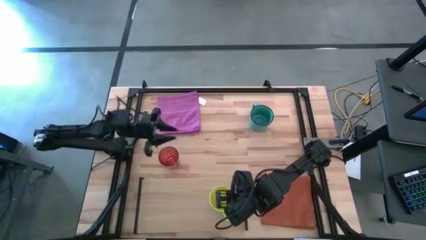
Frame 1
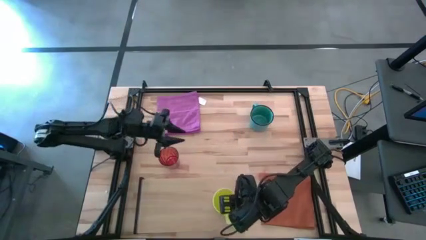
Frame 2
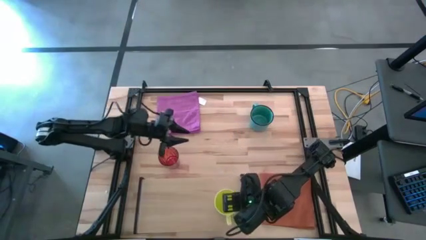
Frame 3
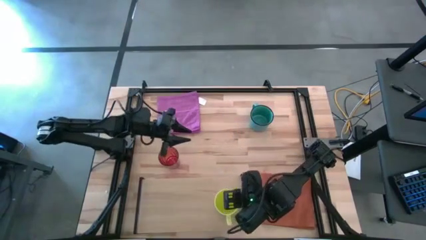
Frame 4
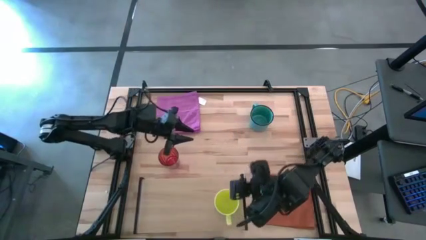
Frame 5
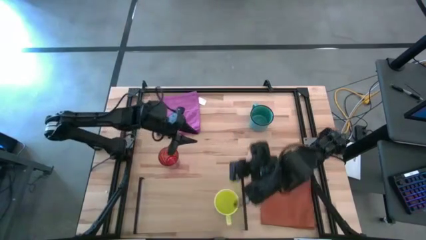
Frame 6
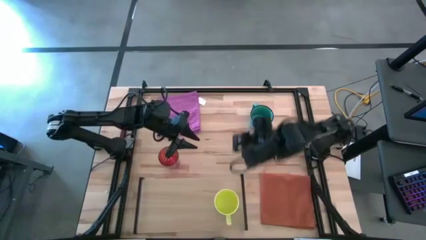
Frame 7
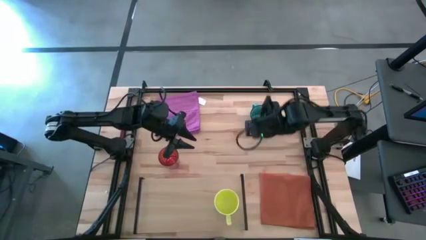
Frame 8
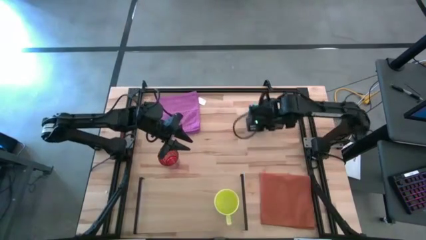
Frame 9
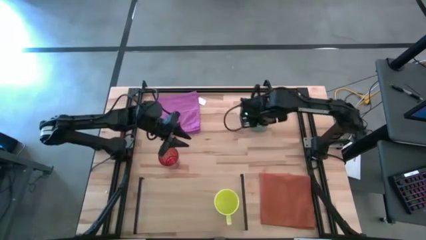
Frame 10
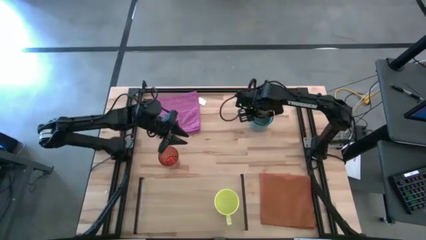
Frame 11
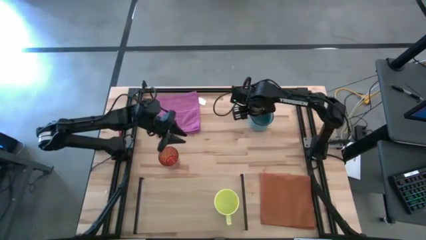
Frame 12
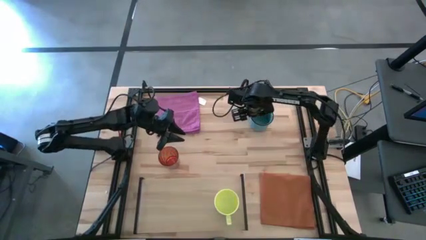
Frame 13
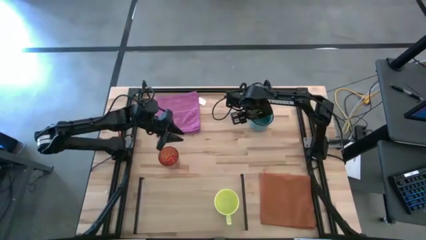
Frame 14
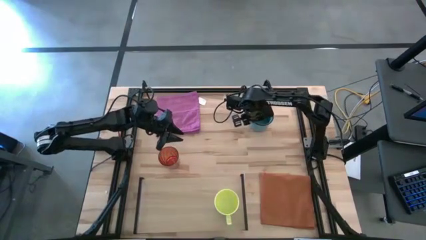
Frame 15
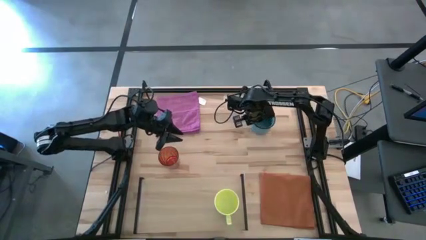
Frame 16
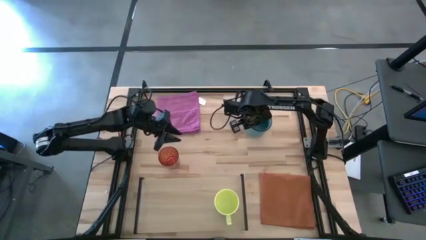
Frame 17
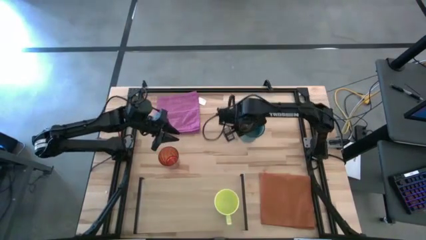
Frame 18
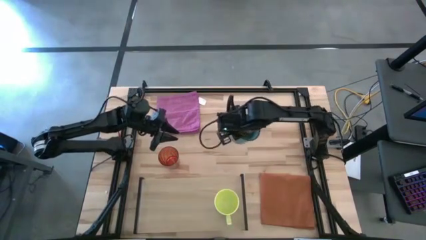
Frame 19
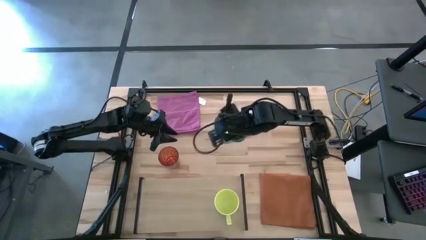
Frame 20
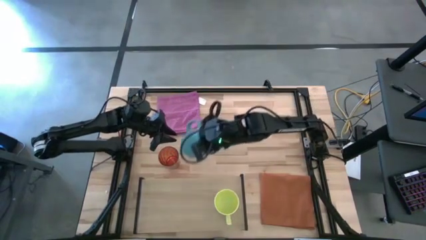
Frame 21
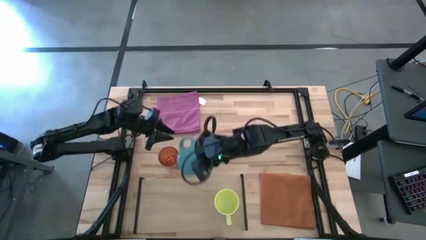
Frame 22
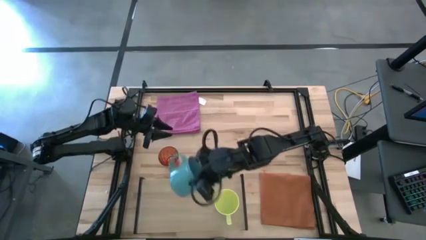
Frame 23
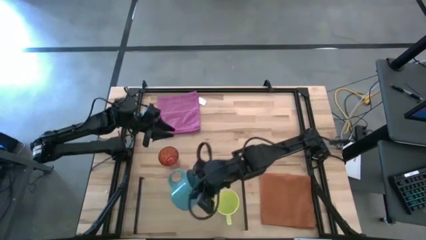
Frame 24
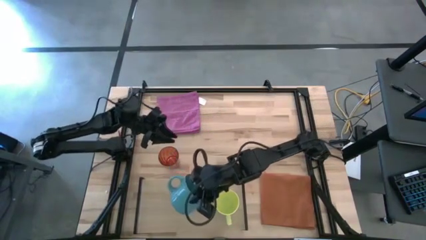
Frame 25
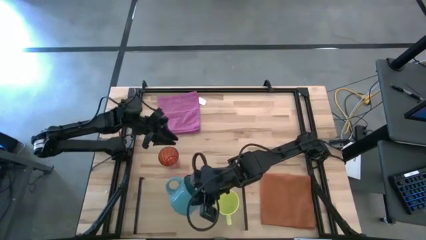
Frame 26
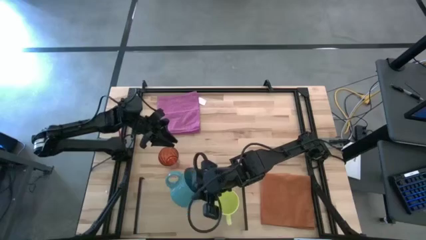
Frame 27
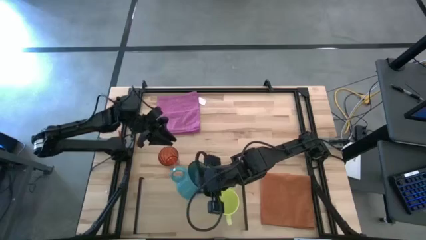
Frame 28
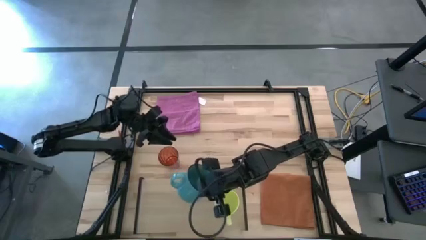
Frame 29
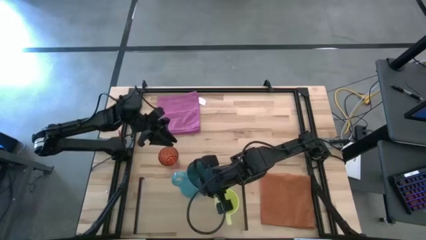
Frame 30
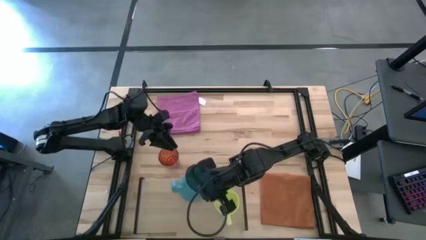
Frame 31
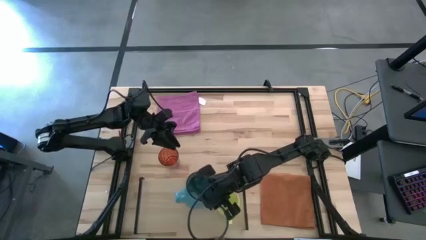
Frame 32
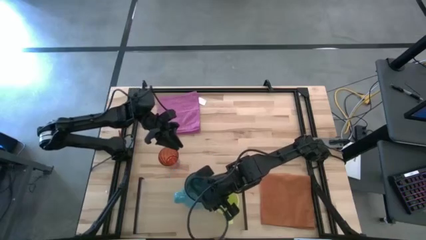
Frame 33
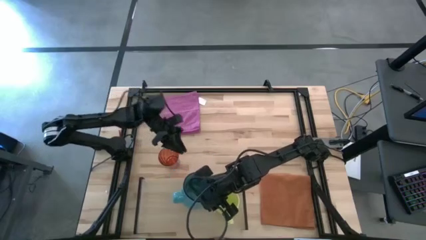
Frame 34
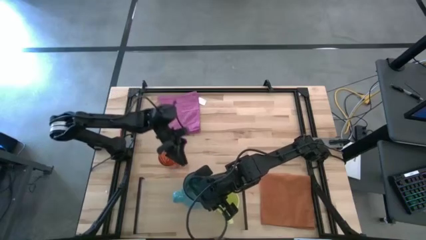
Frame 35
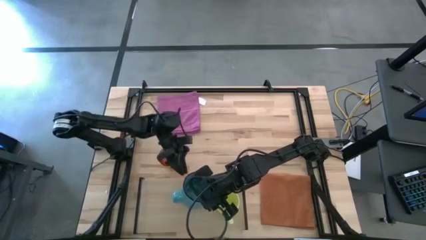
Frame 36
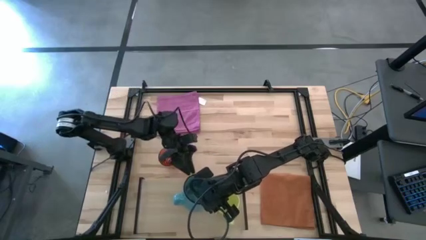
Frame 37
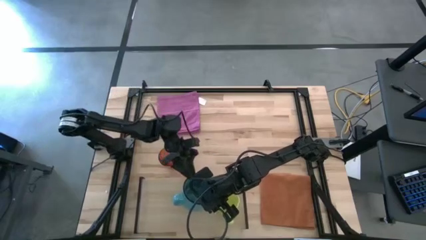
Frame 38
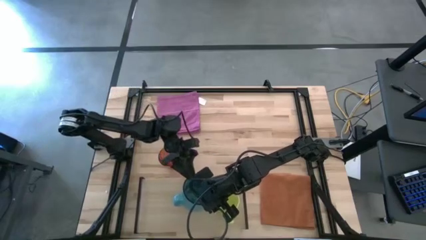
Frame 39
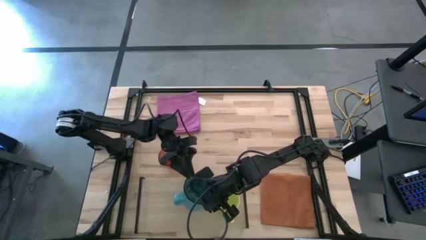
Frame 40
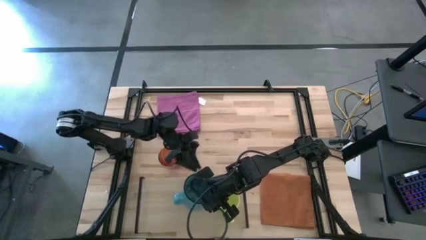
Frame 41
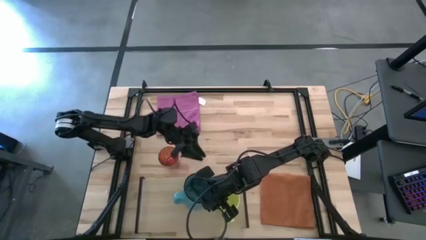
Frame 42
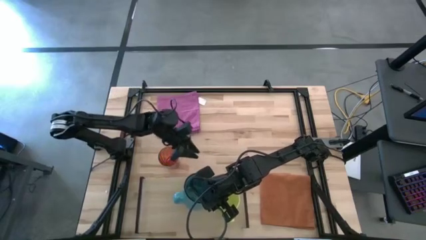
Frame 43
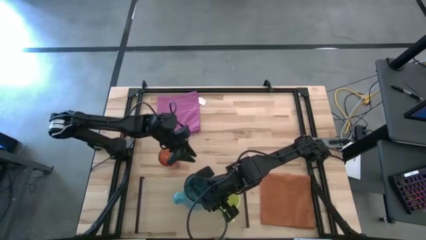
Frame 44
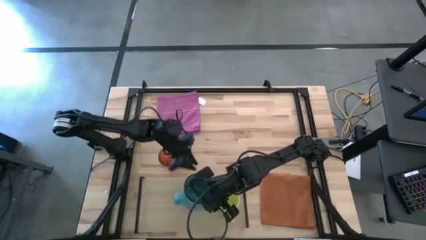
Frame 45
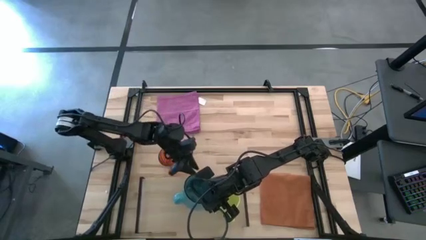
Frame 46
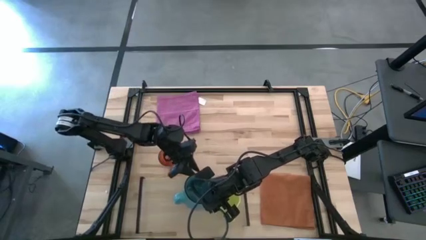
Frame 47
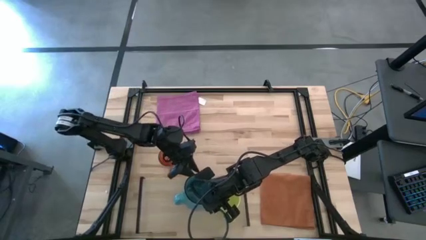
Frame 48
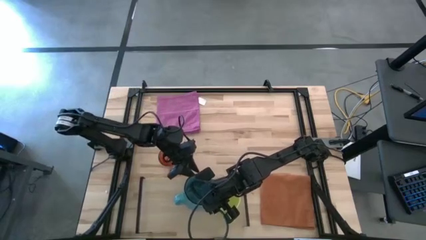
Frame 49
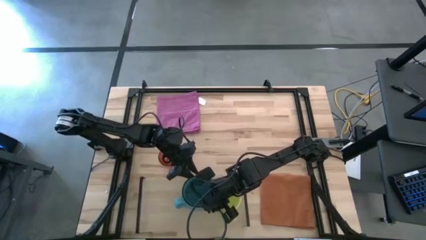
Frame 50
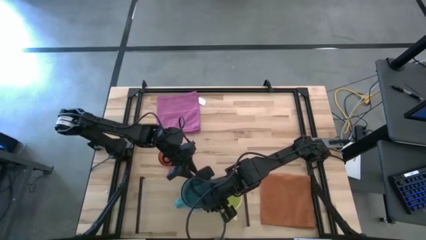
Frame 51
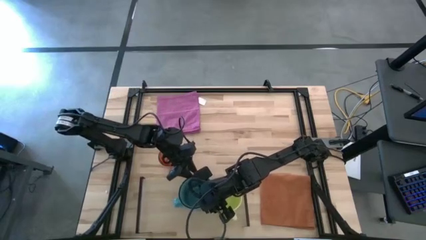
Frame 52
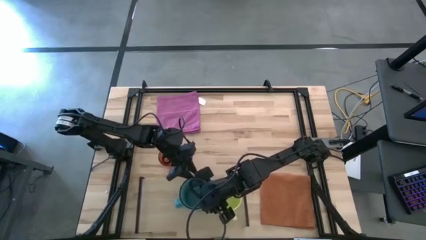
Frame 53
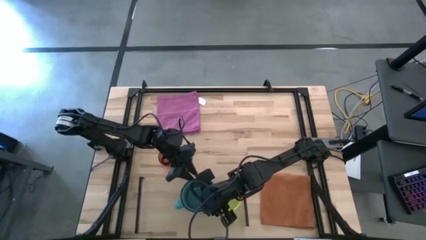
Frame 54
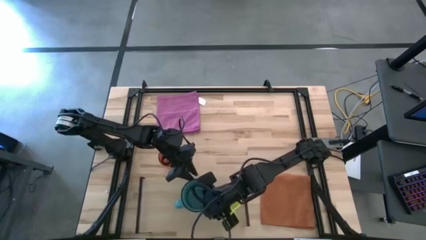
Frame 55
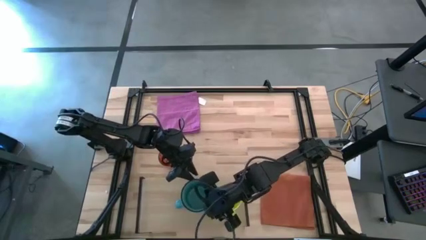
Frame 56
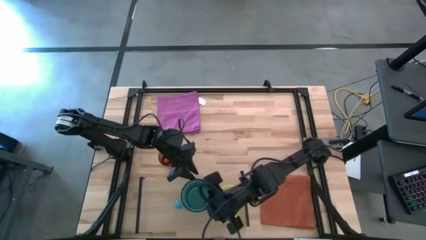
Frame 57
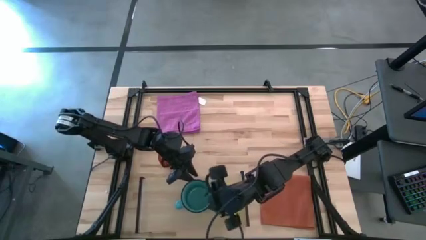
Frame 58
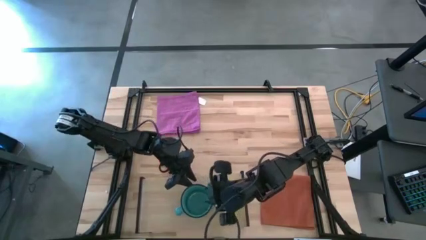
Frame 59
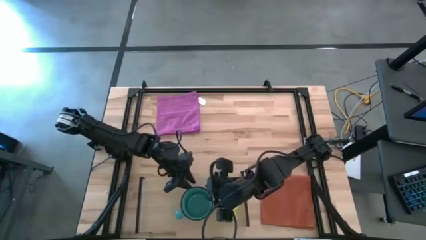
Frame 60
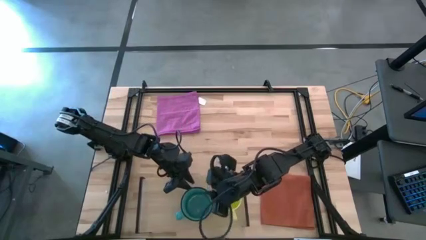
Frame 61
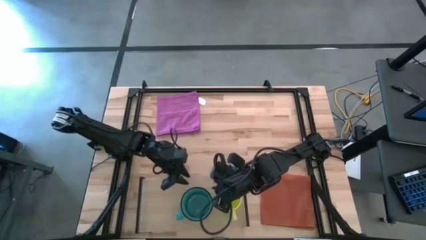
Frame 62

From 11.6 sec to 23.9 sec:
Task: Stack small to large cups/mugs on shelf
Put the blue mug on the shelf

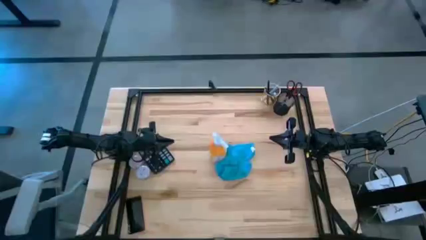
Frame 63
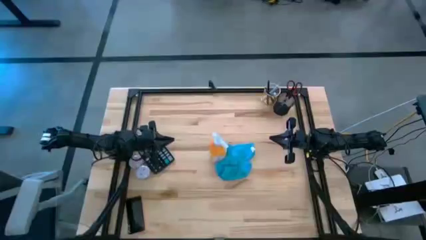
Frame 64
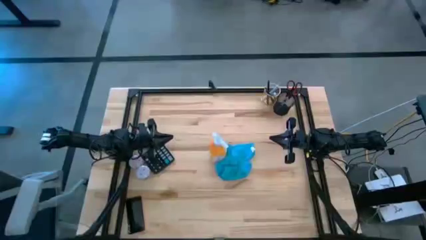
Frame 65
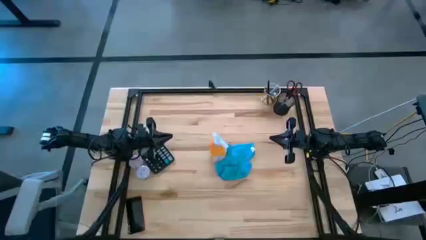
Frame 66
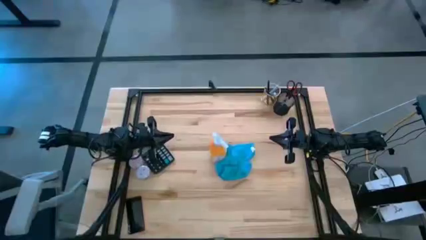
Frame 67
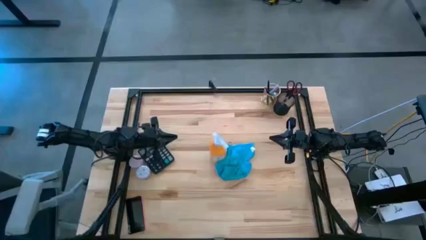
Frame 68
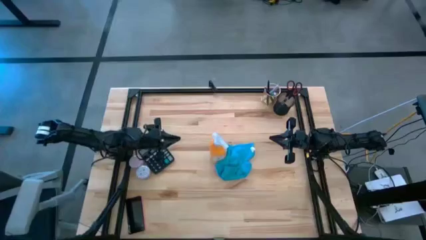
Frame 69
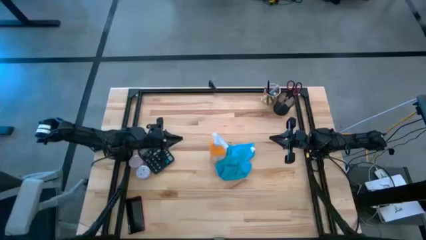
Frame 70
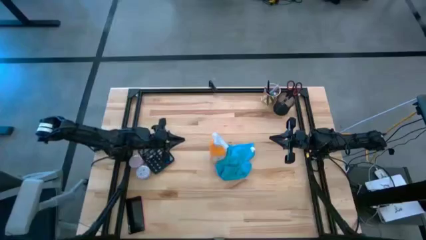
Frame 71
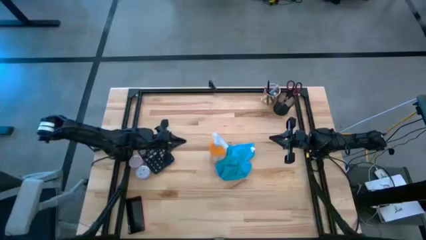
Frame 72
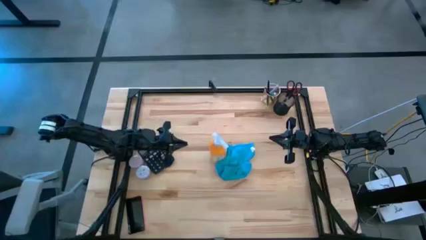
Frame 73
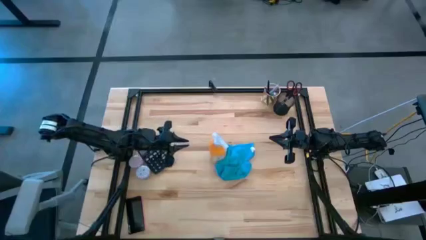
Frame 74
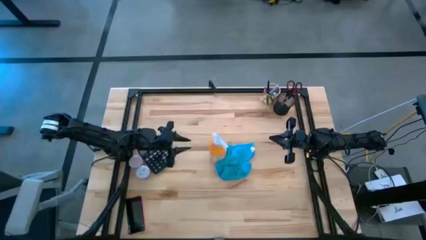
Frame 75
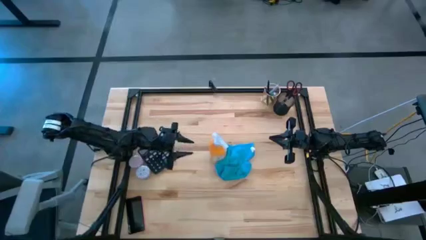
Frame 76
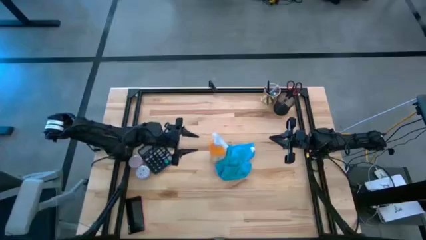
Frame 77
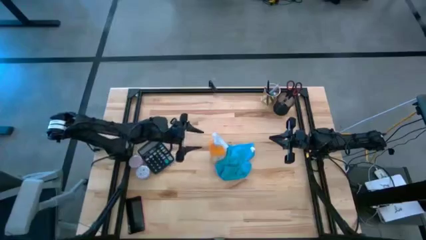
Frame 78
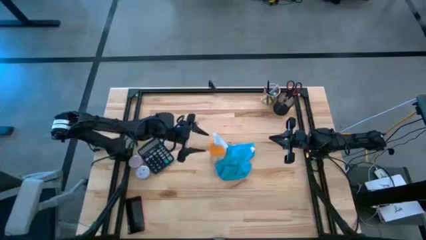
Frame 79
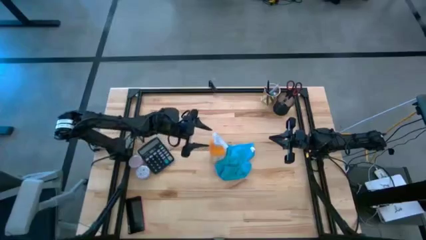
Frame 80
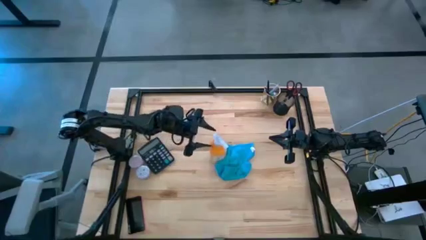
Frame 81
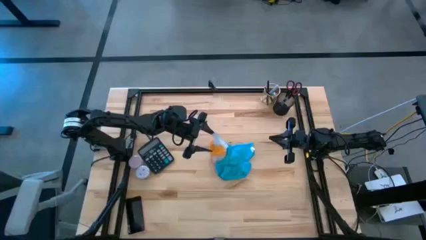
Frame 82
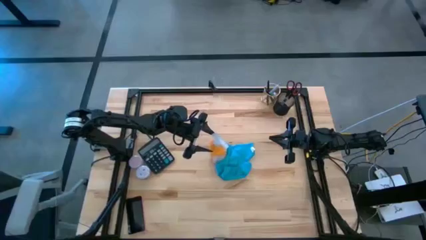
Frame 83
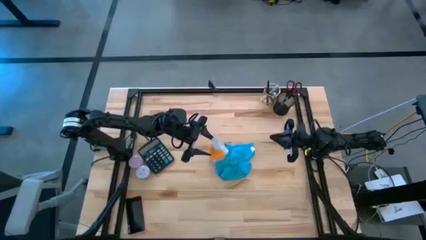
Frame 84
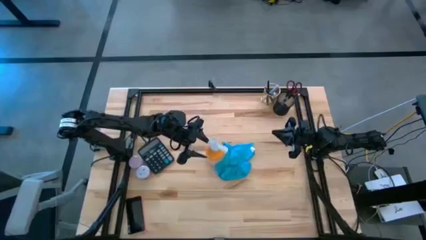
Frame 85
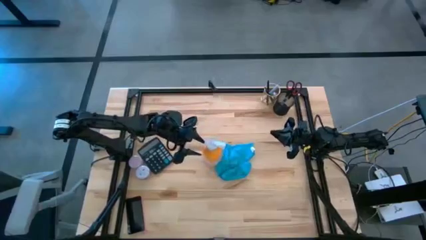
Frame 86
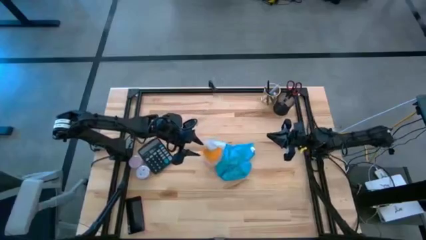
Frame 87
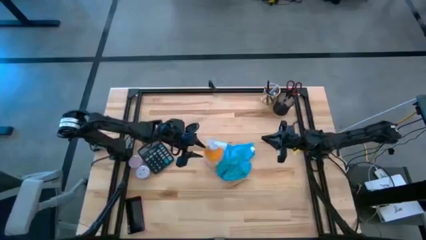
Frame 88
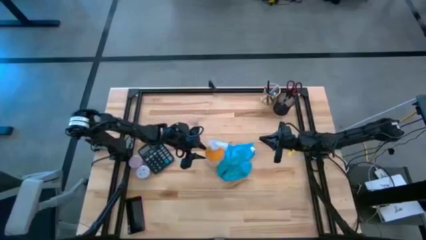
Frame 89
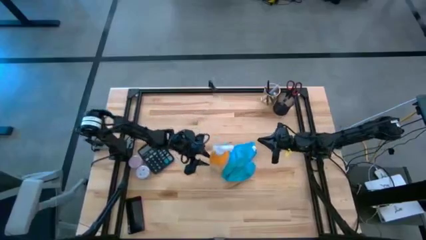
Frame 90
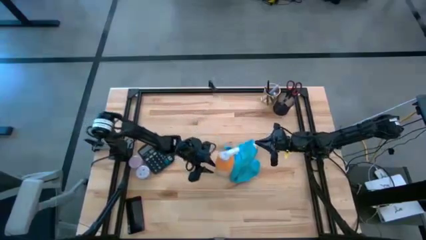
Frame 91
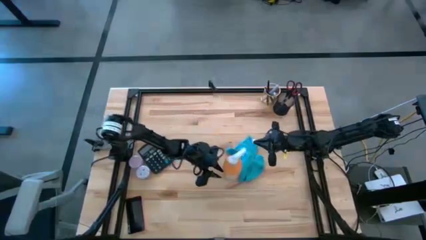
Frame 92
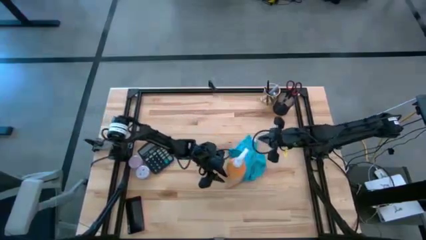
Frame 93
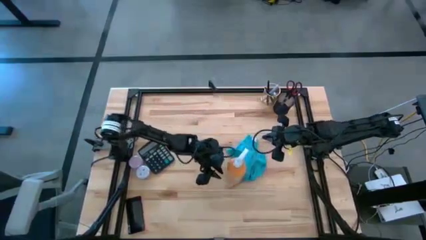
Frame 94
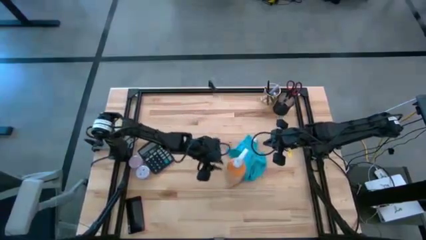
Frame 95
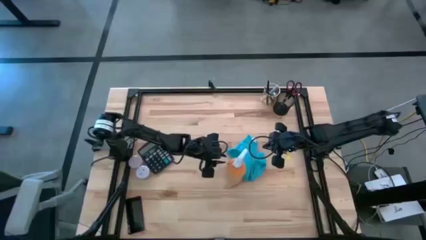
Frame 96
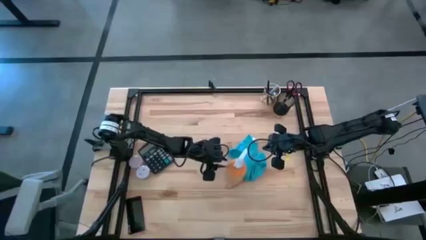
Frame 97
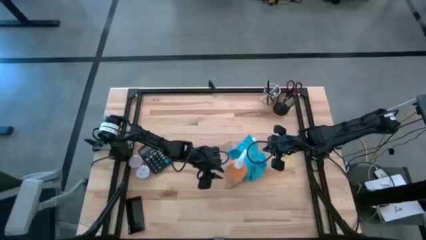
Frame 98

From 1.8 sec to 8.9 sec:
Task: Apply microfiber cloth
Move the yellow spray bottle to the middle right of the table
